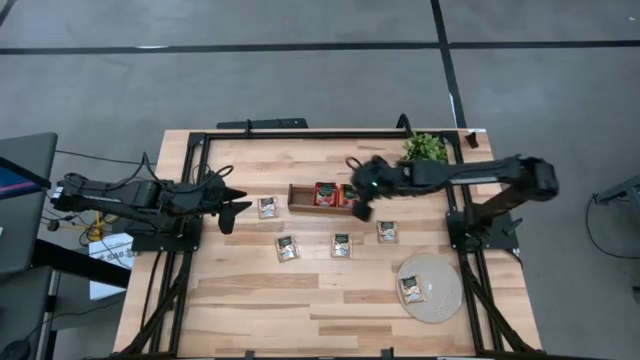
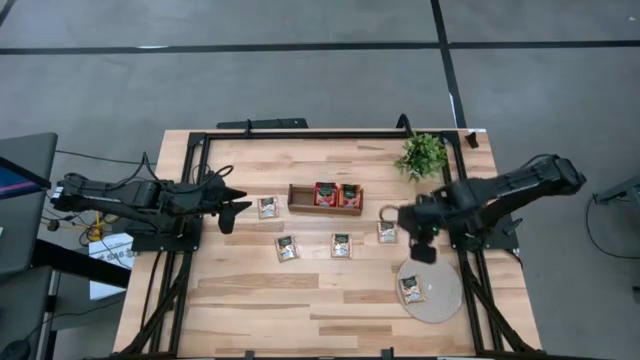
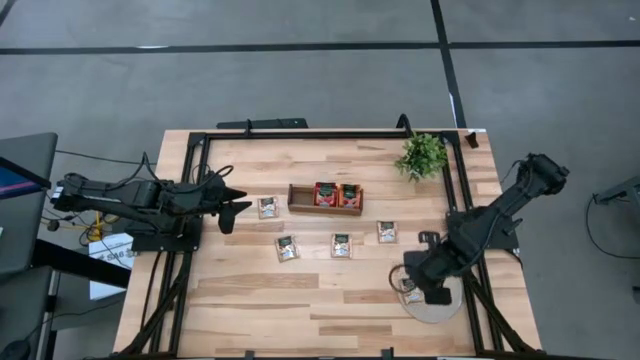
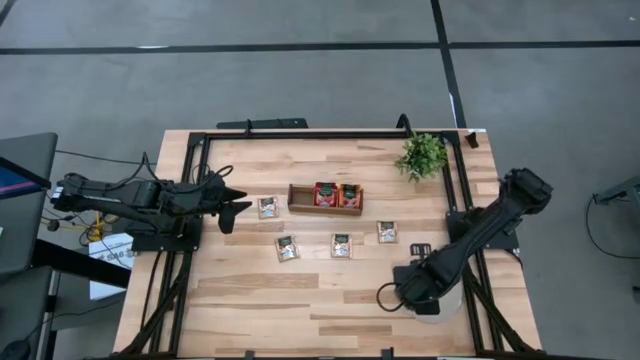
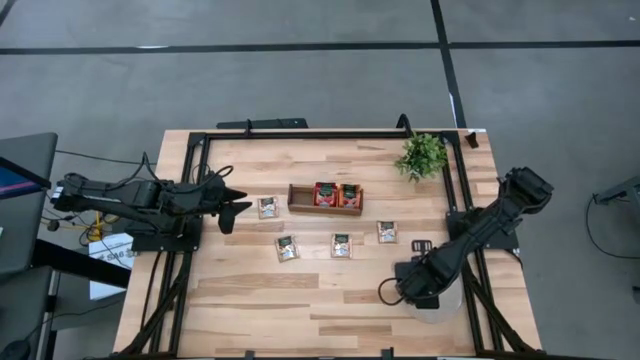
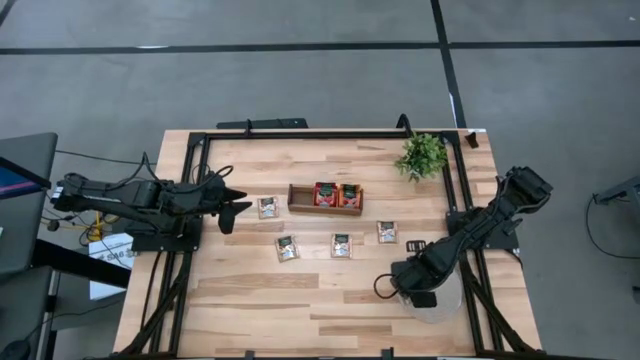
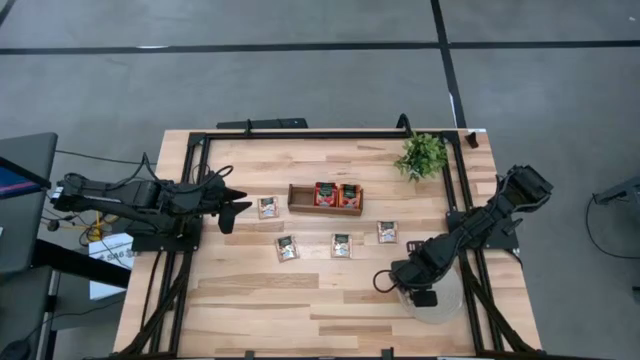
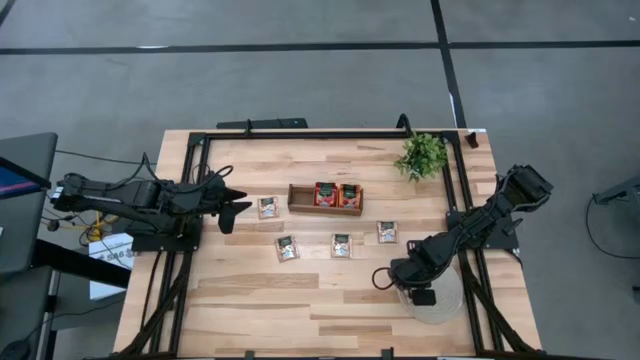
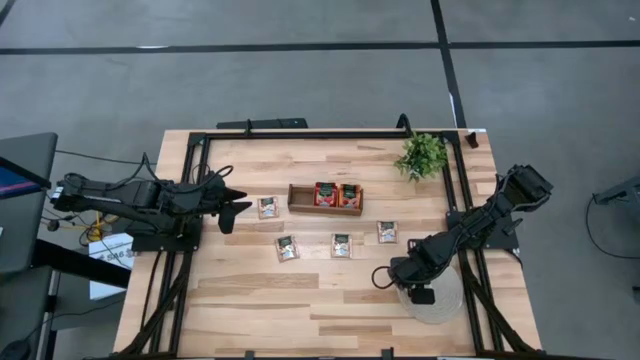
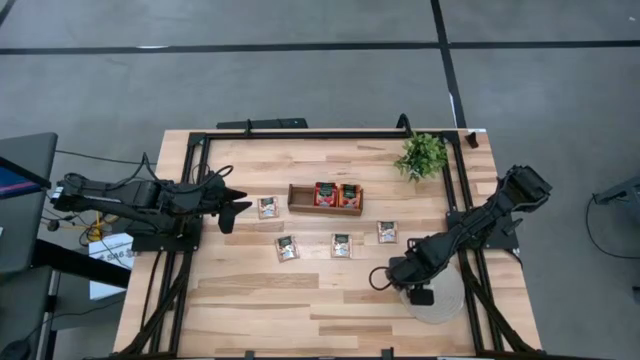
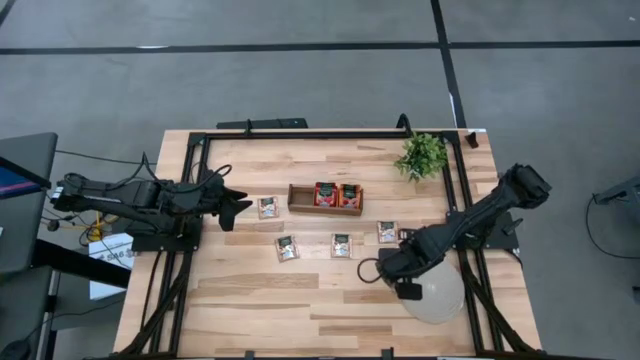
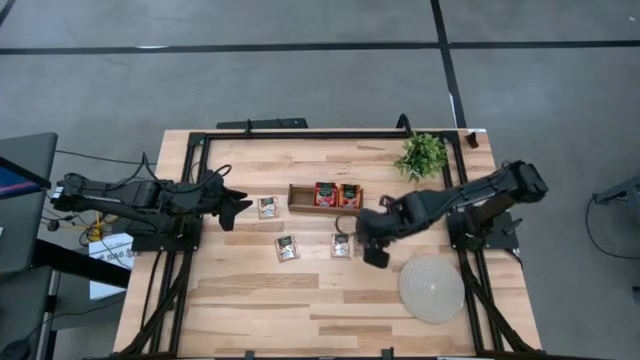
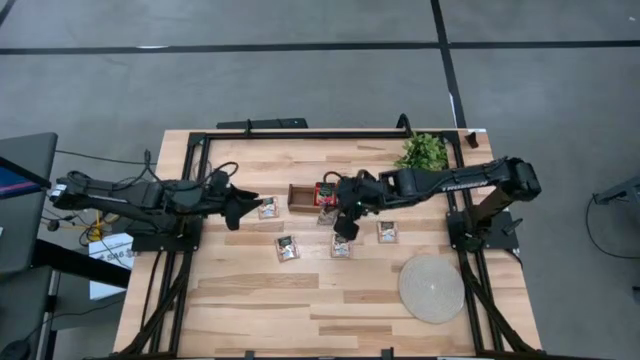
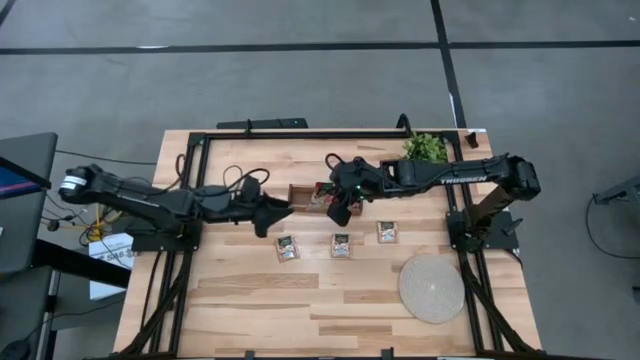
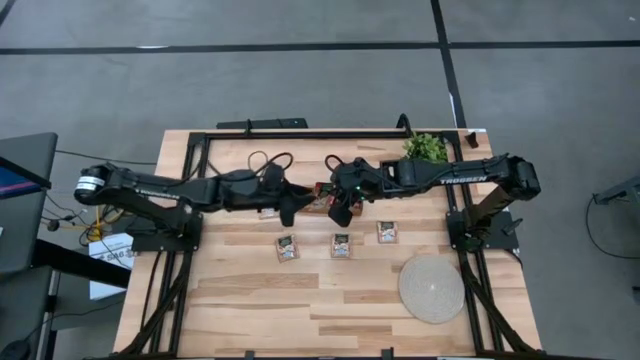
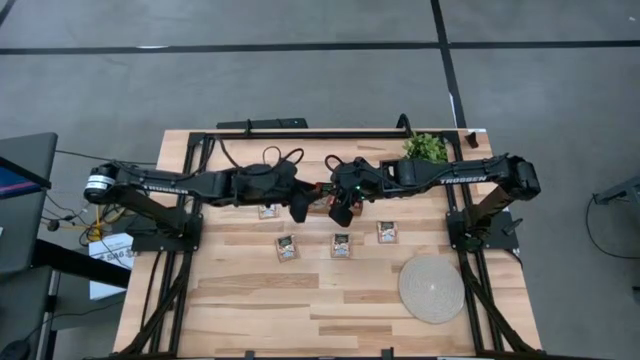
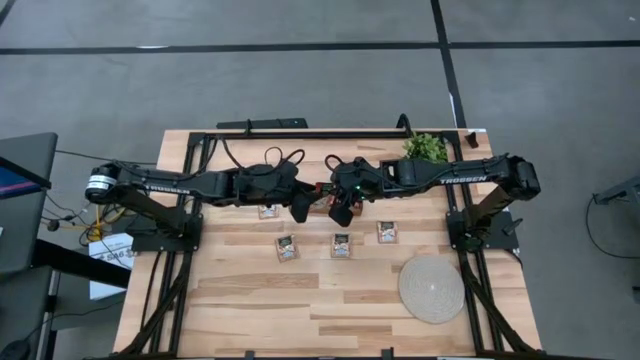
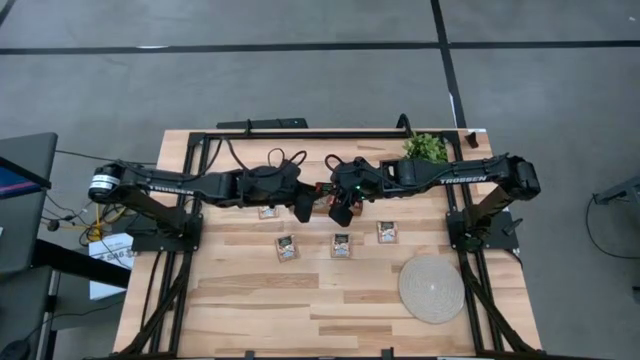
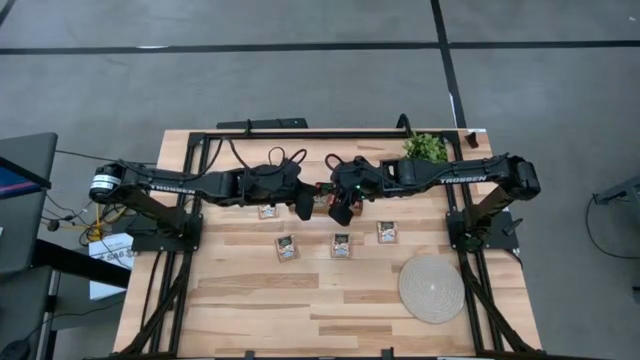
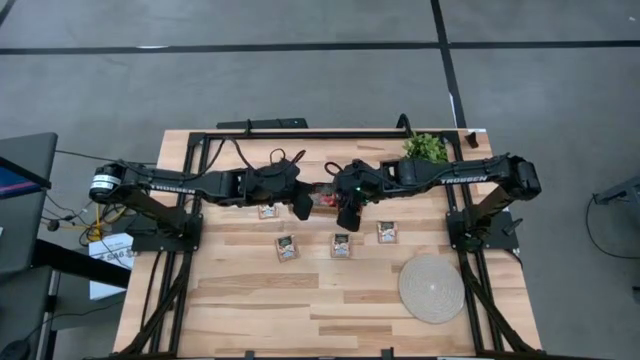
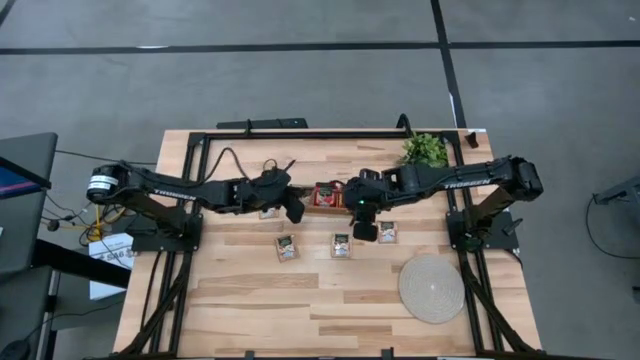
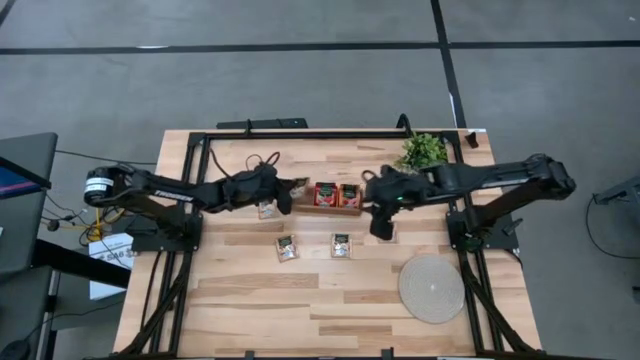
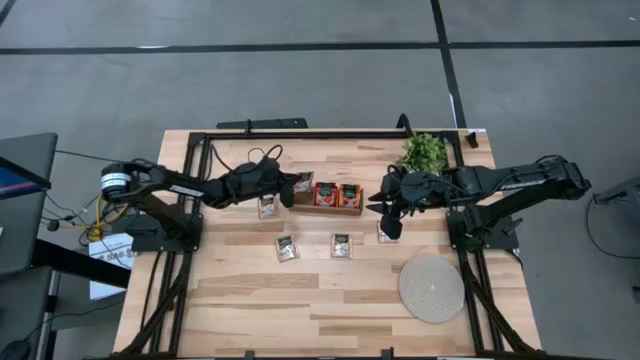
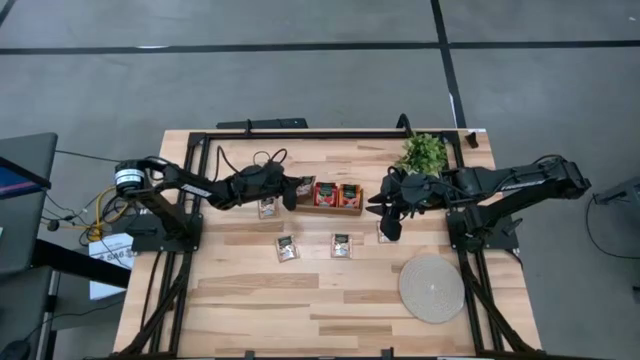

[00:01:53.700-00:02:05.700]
Task: Pick & Place Tea
Put the brown tea bag into the left section of the wooden organizer

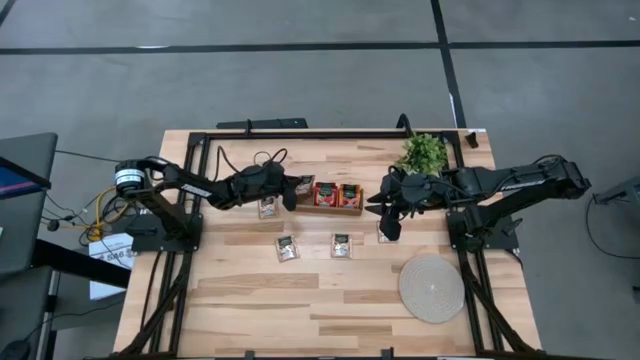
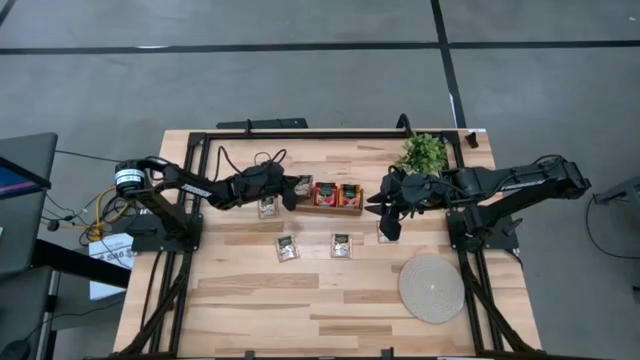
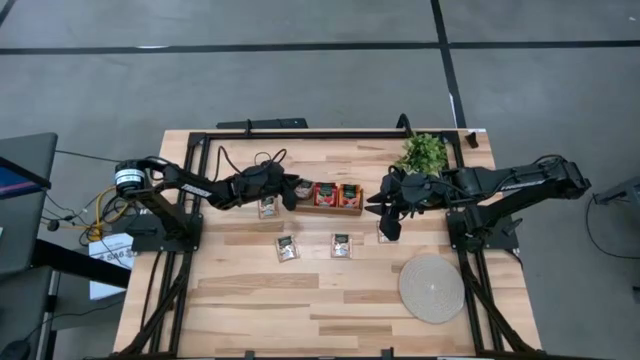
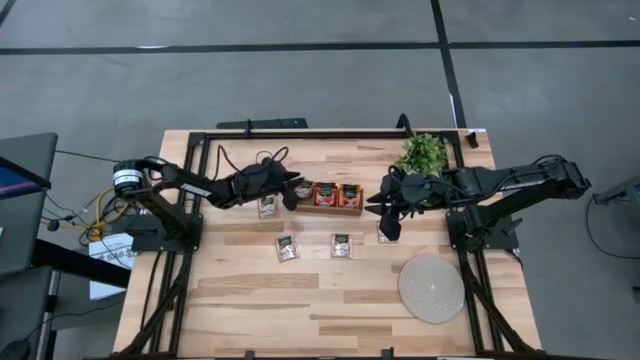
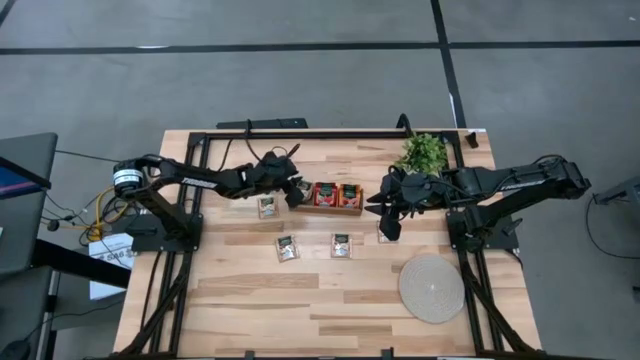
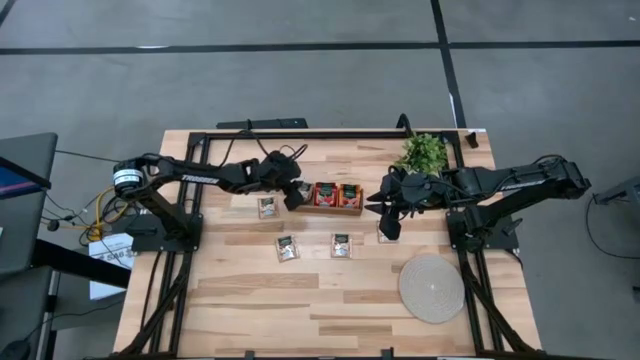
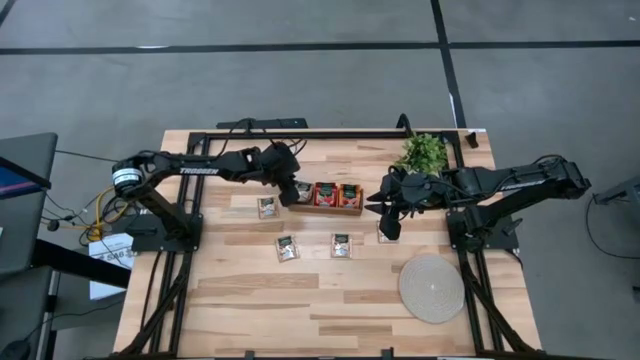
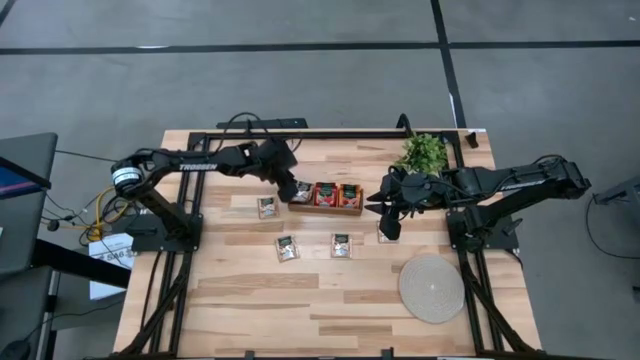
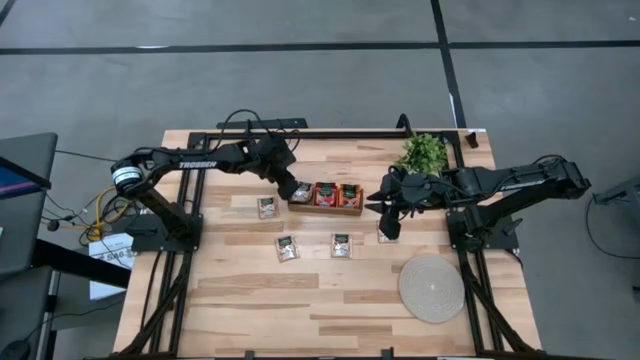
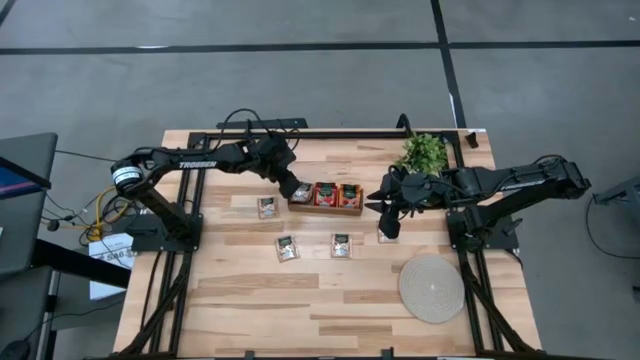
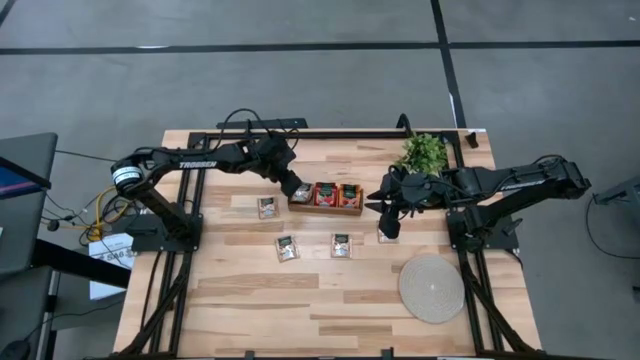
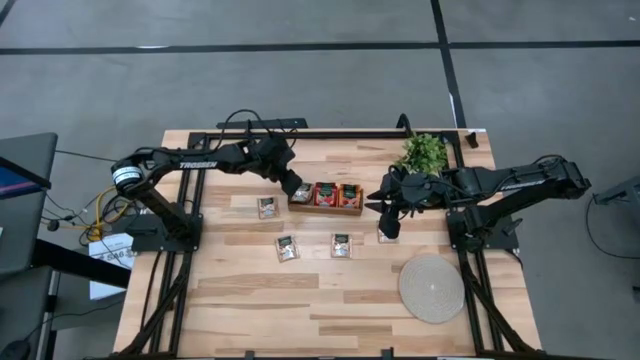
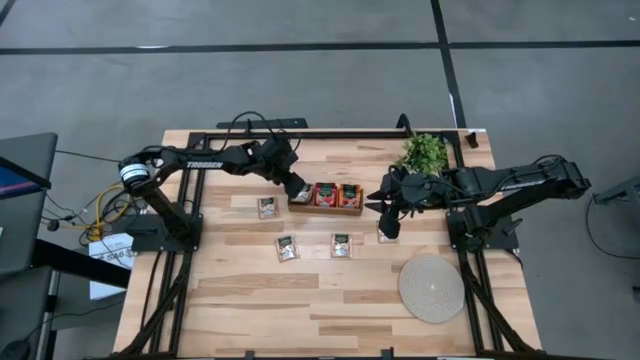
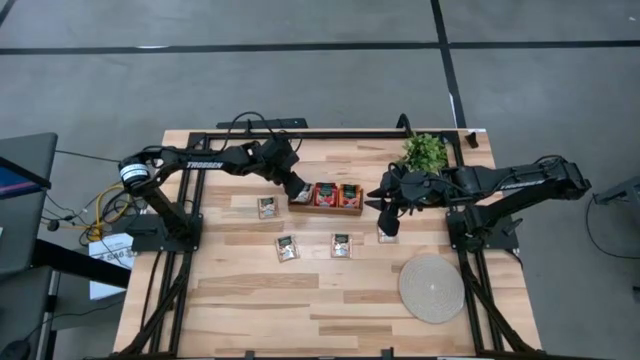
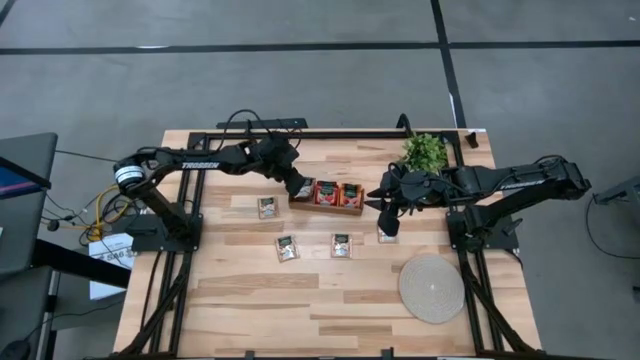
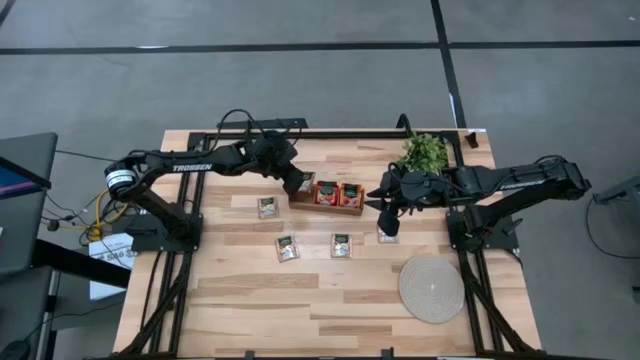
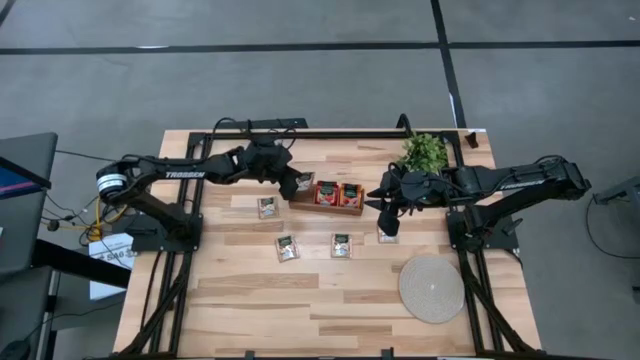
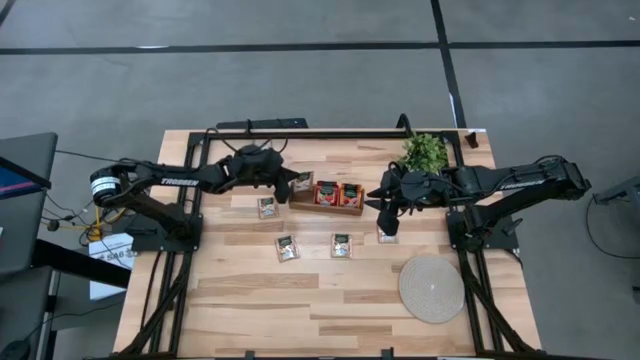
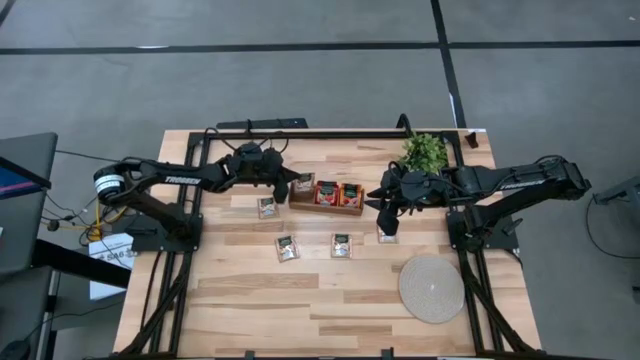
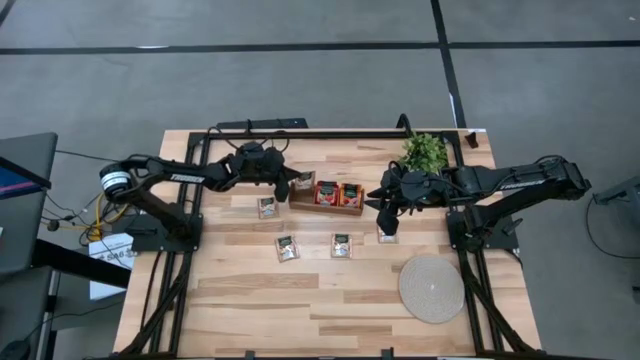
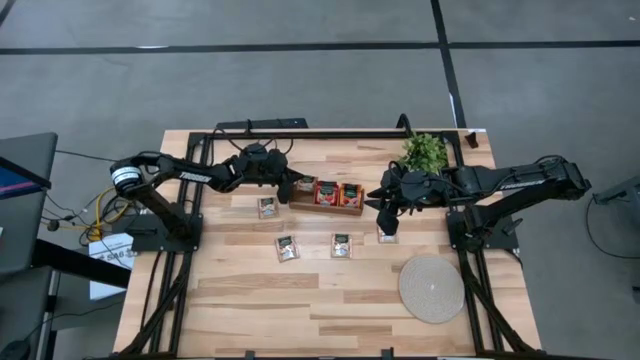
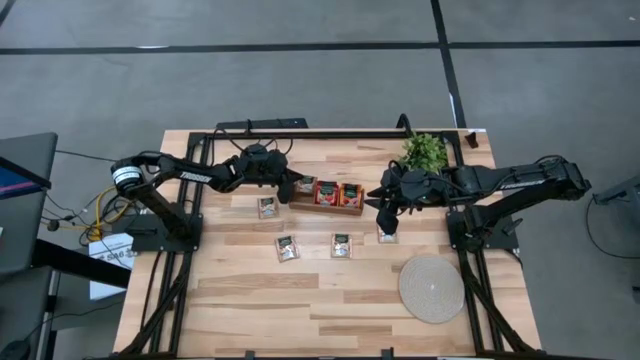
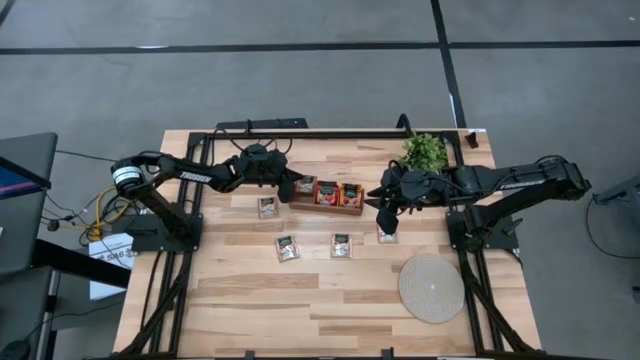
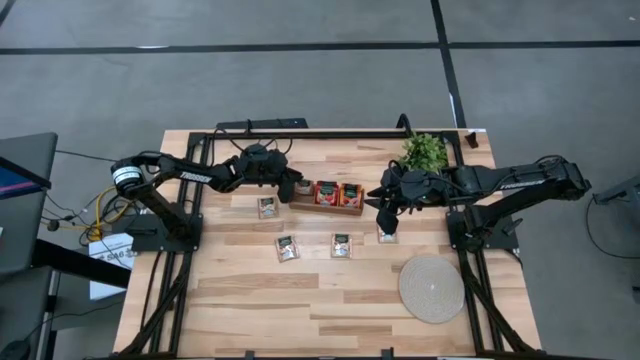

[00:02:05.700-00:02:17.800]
Put the brown tea bag into the left section of the wooden organizer
